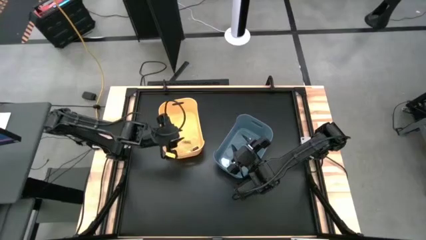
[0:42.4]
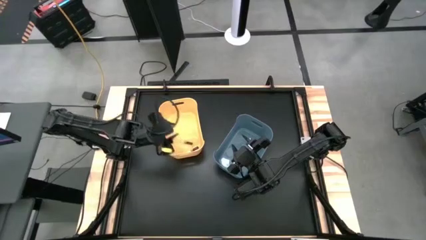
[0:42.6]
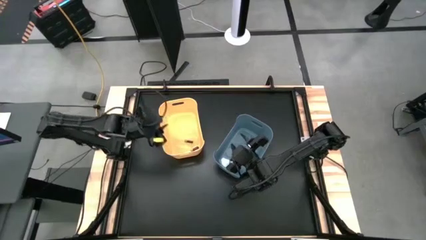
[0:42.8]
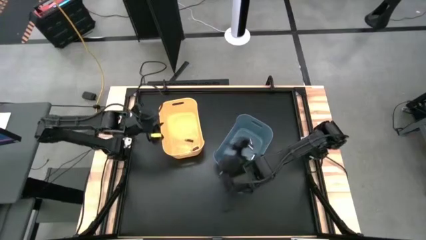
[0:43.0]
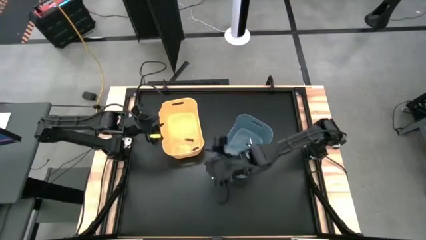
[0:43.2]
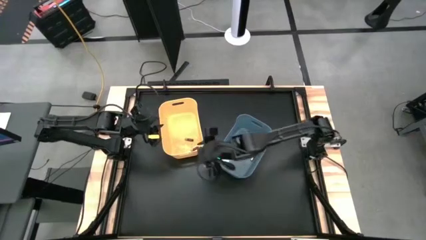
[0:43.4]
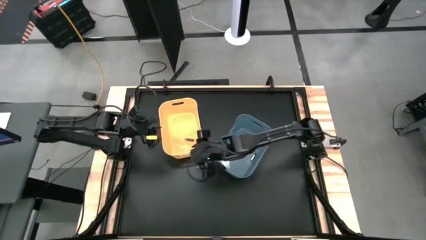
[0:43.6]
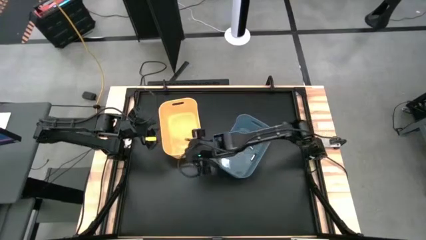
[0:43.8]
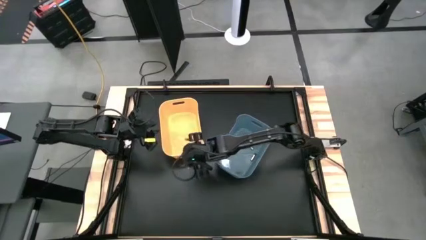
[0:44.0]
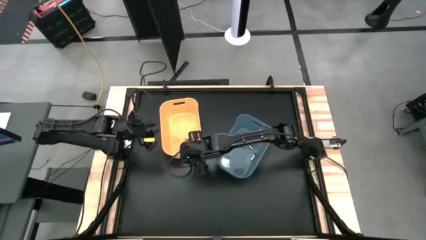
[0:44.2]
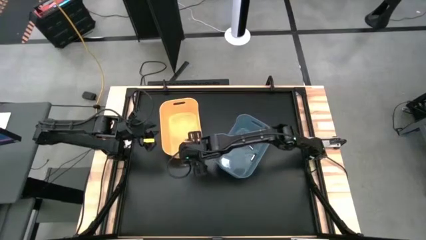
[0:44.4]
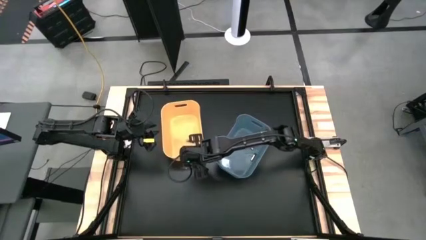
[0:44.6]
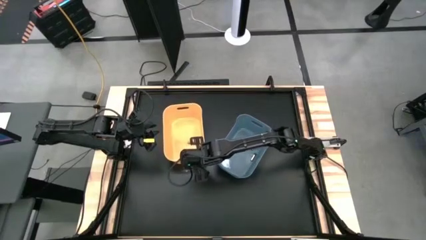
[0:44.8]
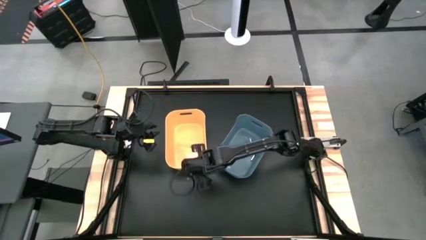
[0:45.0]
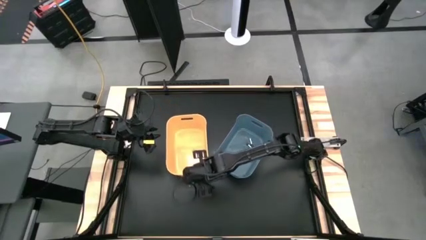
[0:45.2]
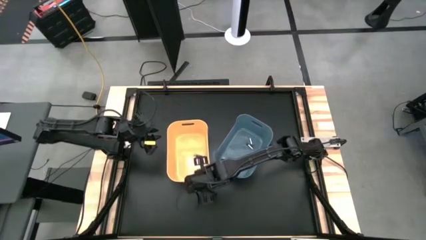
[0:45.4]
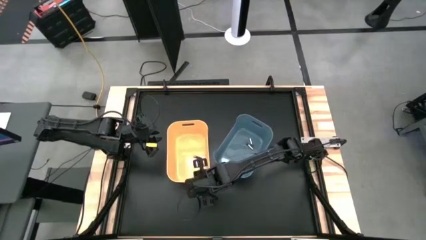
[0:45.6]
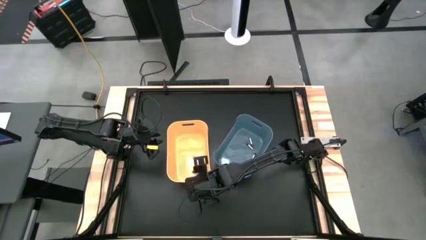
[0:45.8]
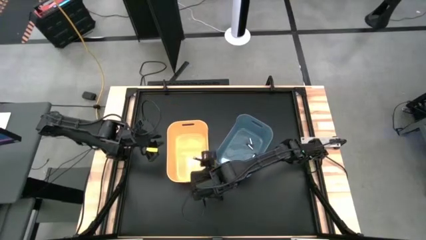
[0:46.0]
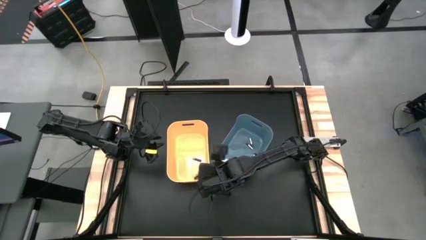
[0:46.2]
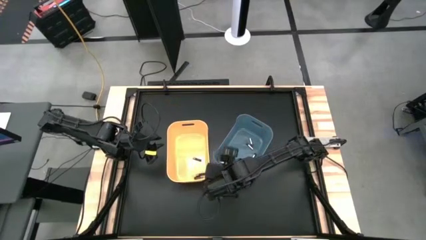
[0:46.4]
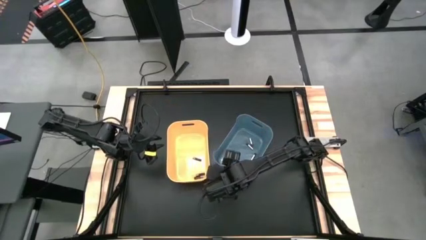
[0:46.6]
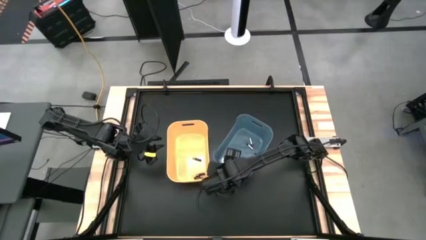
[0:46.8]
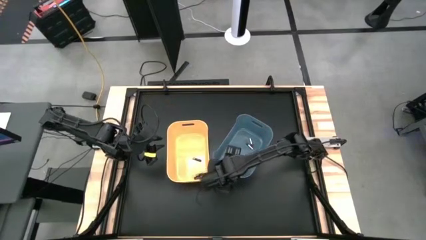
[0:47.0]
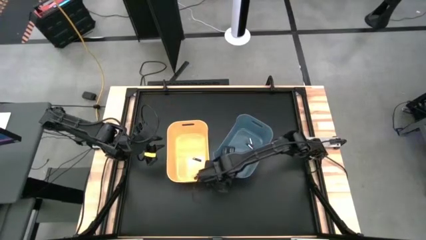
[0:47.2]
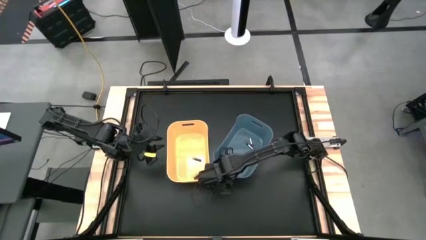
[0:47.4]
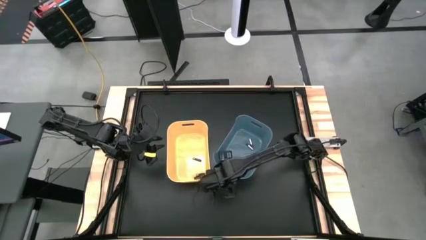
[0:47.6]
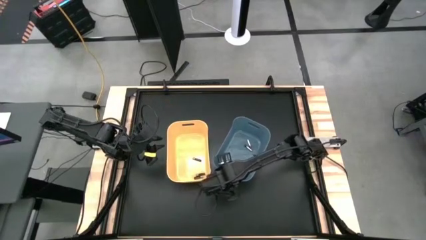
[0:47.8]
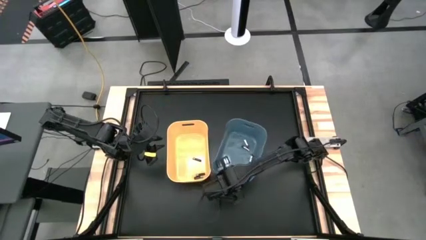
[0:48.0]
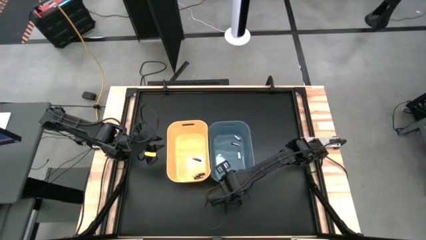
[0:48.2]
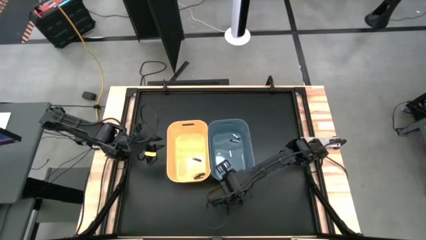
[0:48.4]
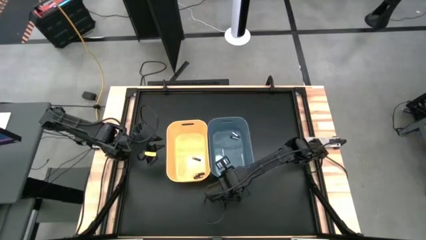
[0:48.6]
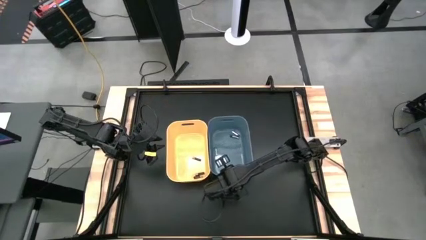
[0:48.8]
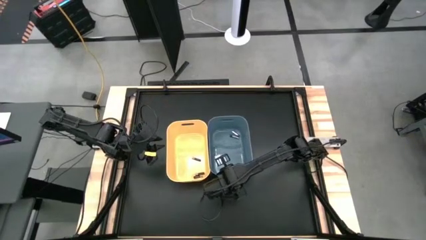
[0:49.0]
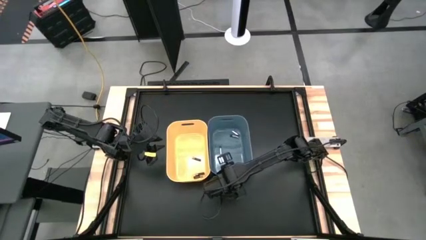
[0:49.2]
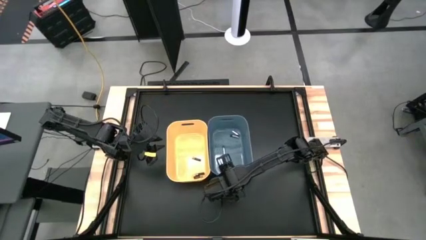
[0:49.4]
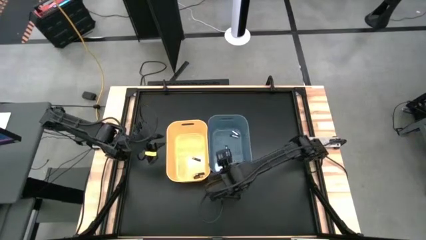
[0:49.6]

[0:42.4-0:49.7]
Task: Sort batteries
Adjust the bins

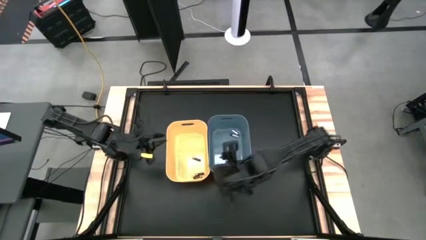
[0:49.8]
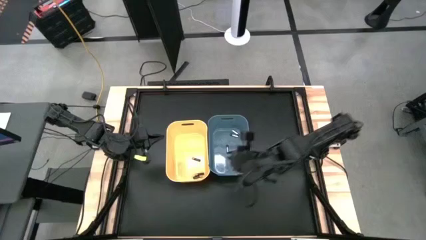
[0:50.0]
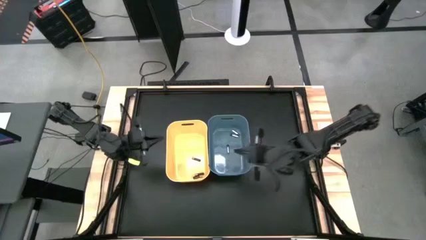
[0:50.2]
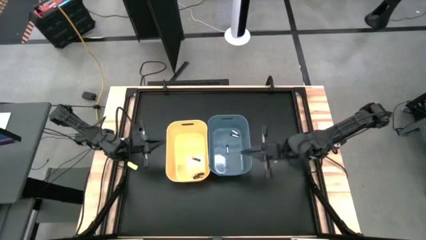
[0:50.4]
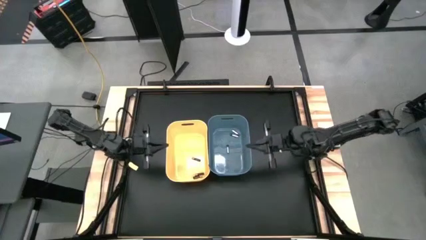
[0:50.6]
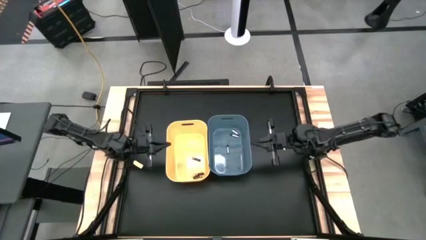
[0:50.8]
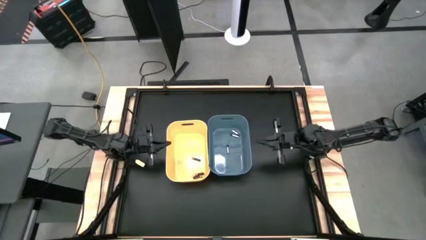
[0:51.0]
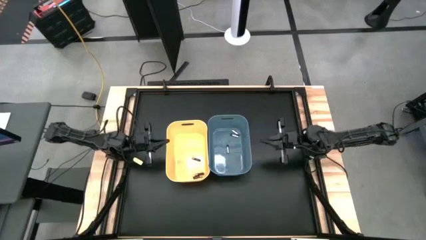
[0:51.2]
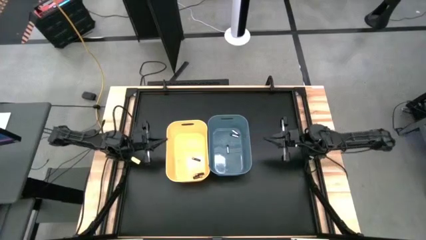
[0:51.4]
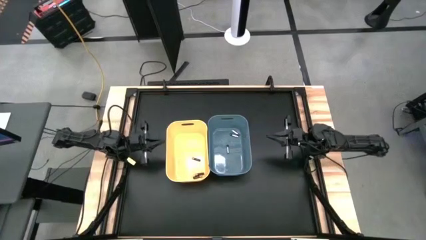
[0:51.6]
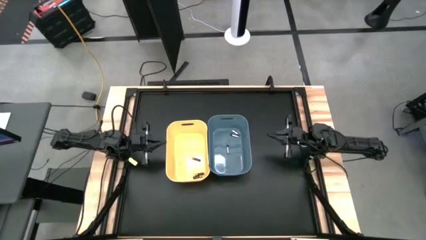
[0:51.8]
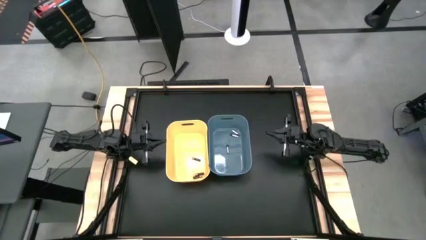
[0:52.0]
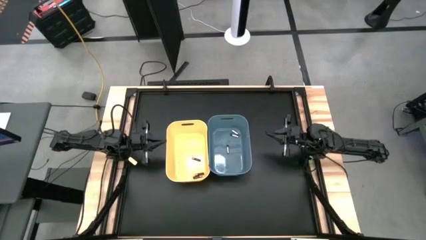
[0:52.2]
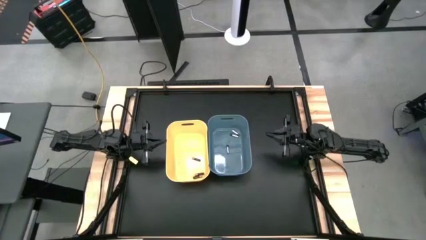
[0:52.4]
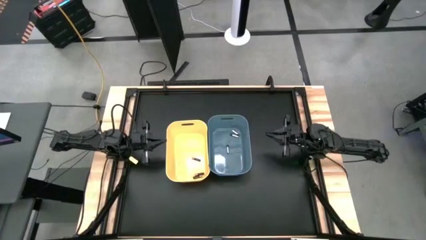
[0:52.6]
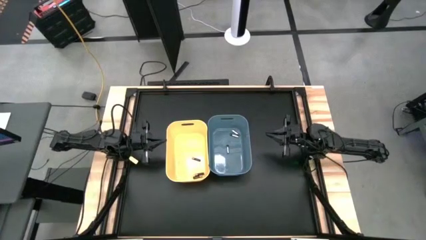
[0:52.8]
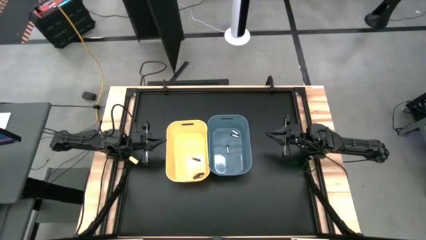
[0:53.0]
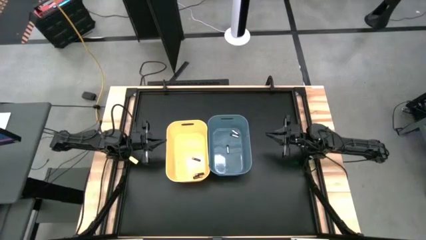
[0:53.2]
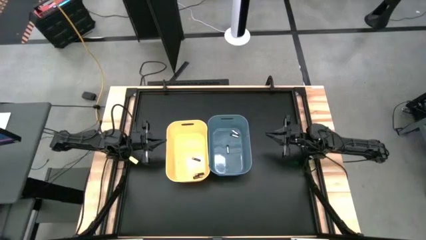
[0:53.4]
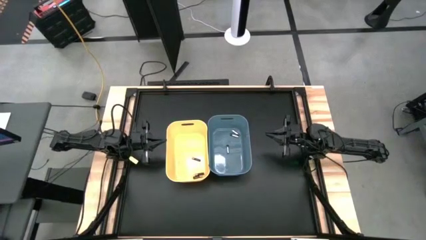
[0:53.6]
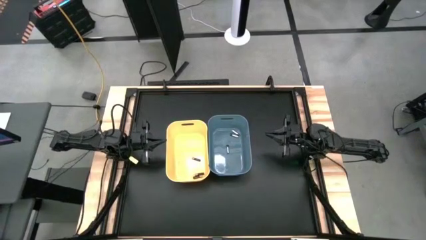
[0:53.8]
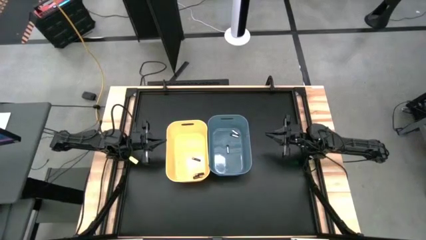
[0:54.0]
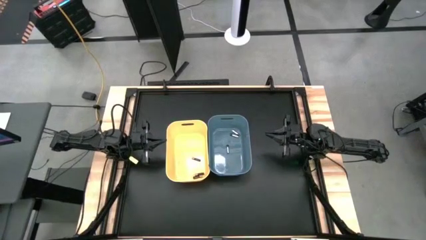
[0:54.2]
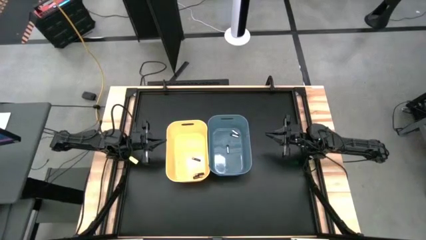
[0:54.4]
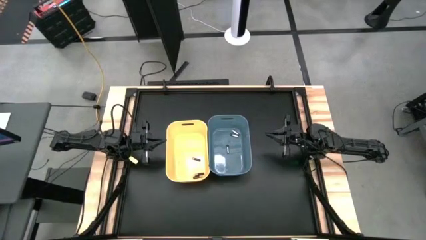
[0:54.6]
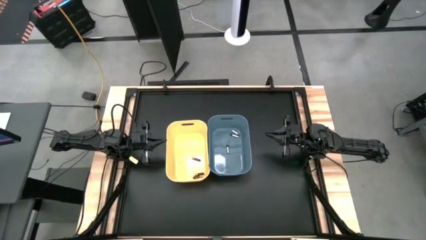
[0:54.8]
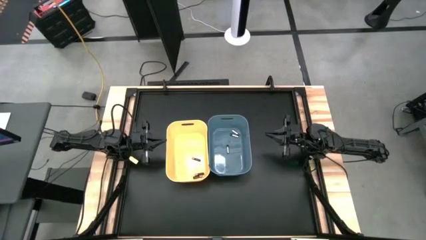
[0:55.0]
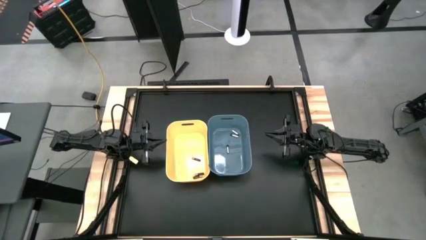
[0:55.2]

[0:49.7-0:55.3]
Return to Home Position

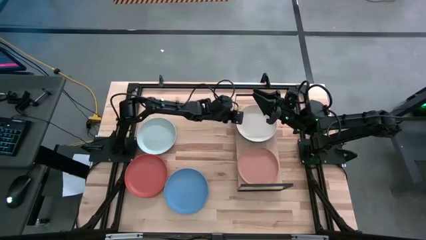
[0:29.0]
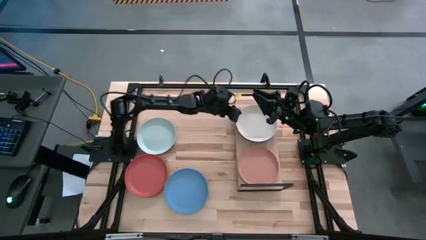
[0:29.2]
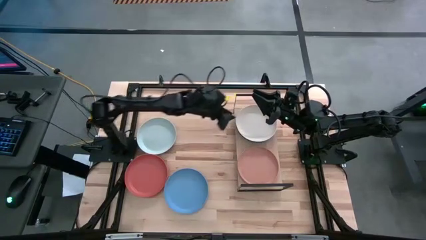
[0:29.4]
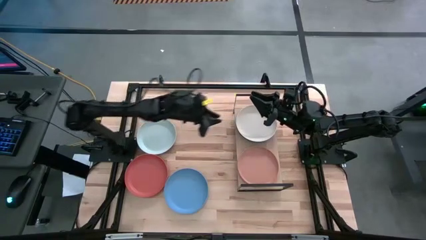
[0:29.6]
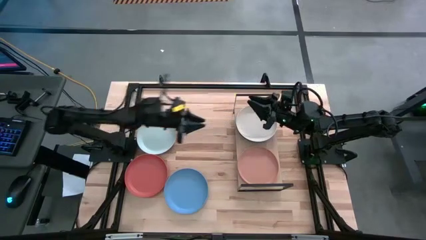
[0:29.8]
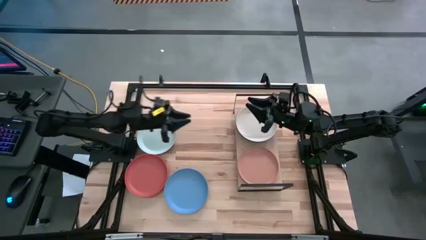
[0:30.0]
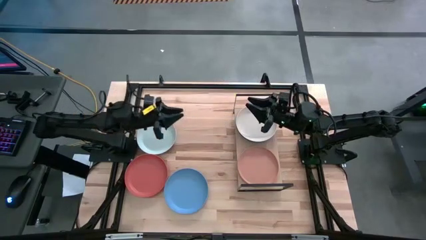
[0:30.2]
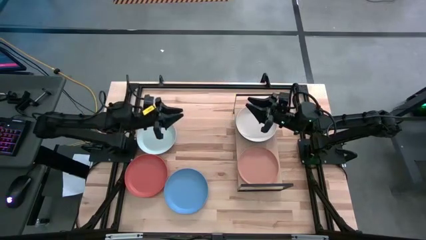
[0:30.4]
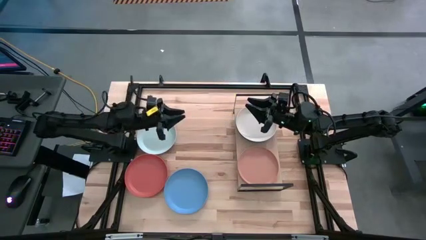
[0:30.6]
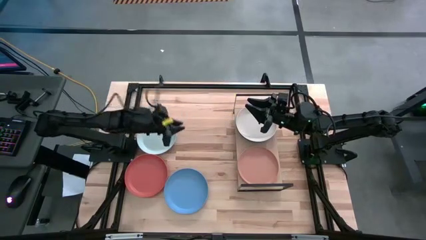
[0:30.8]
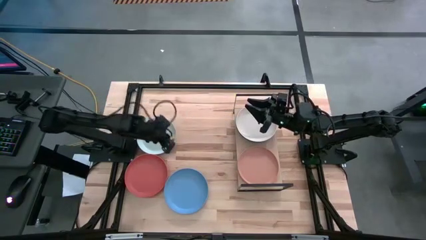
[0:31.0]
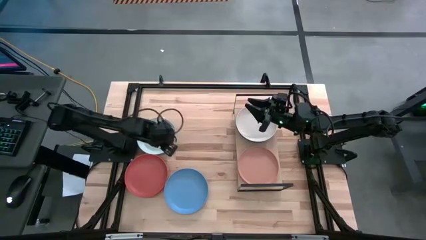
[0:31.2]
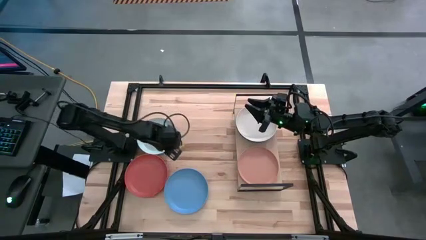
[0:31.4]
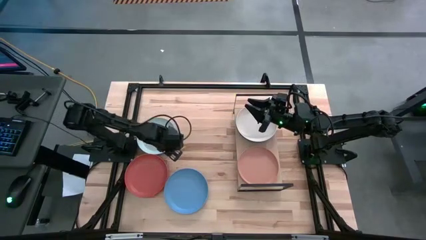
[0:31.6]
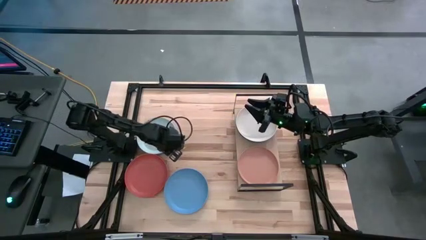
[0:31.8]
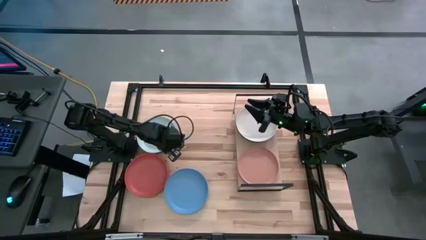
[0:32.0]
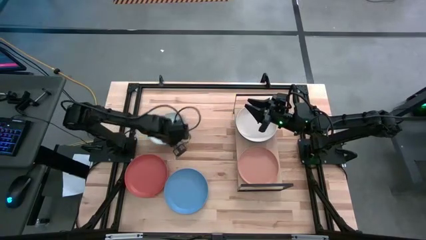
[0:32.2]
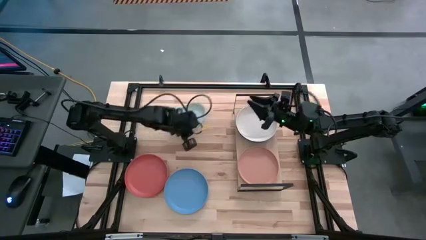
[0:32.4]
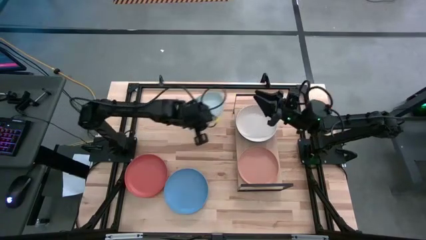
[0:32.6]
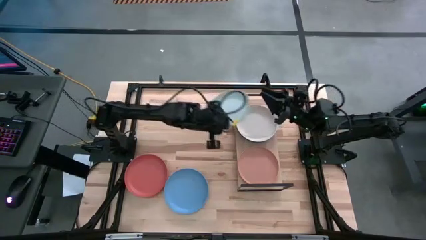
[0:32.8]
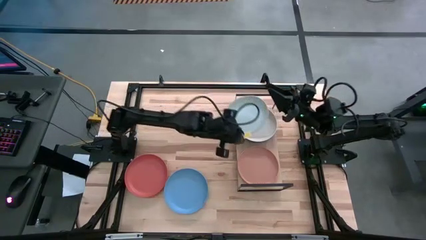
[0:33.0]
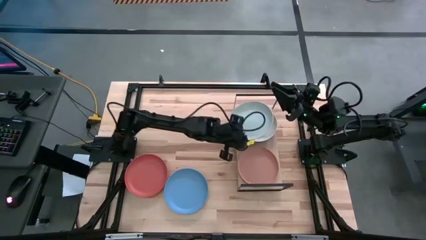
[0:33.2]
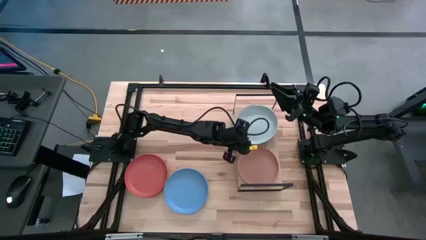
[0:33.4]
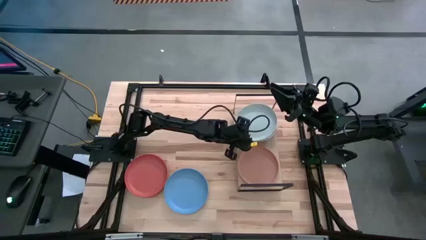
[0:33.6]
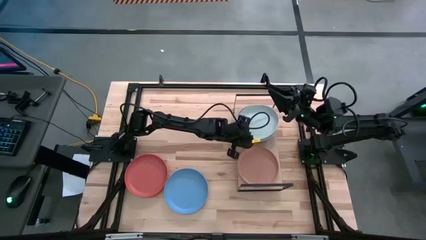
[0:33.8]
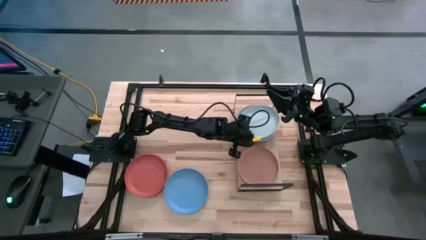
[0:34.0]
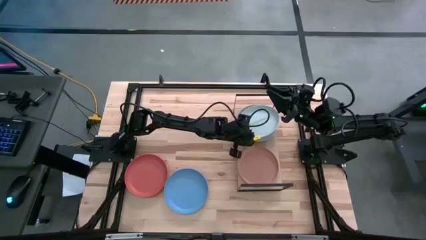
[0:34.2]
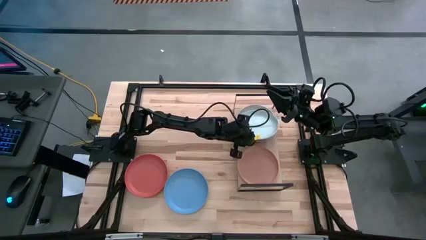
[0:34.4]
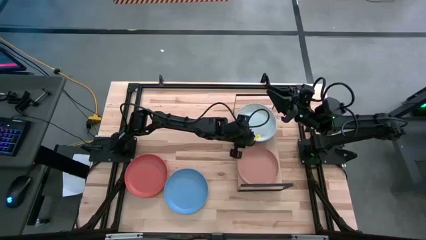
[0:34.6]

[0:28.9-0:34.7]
Task: Place and stack plates onto a shelf
Stack the gray plate on top of the white plate on the shelf
